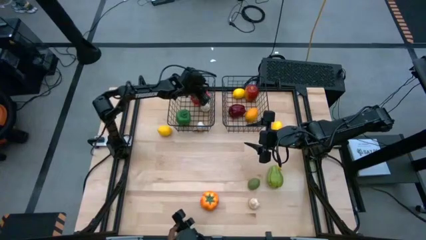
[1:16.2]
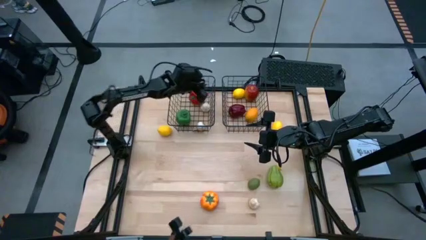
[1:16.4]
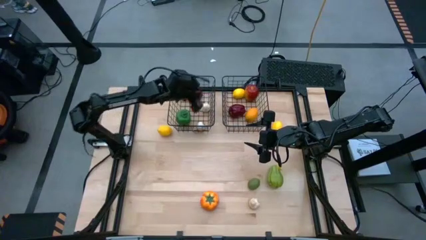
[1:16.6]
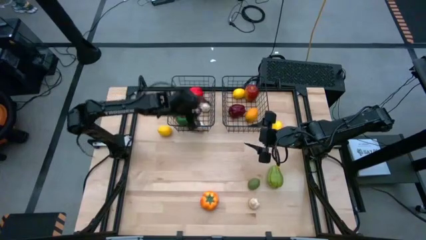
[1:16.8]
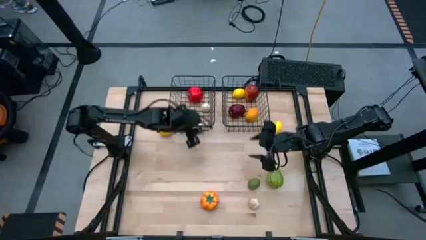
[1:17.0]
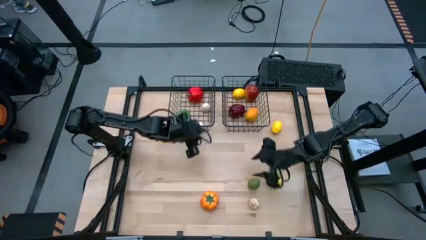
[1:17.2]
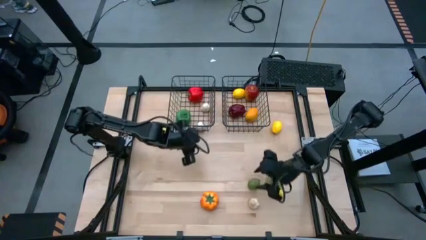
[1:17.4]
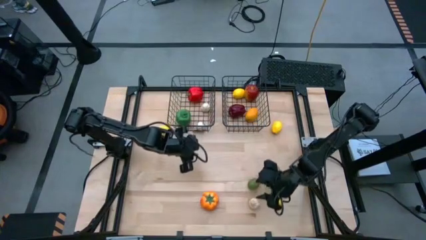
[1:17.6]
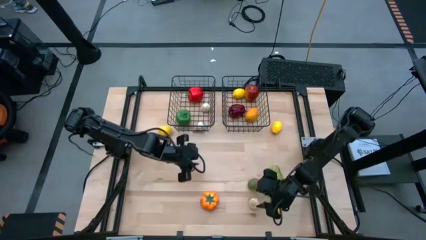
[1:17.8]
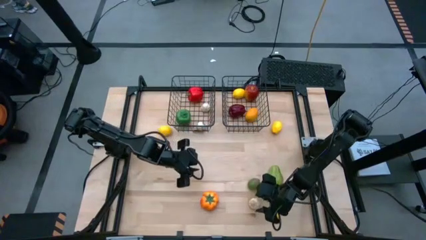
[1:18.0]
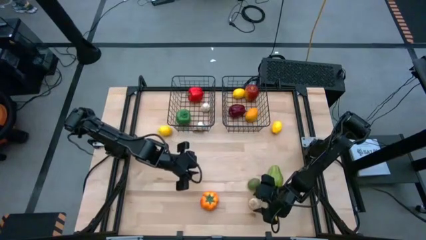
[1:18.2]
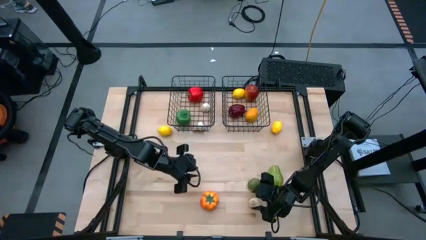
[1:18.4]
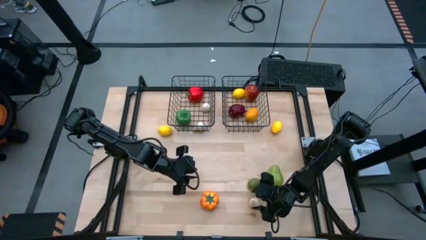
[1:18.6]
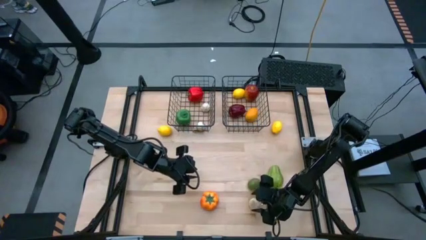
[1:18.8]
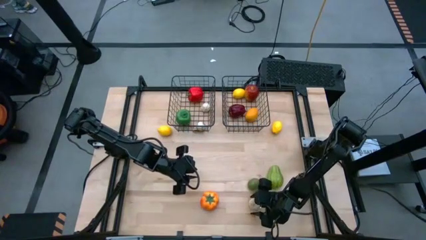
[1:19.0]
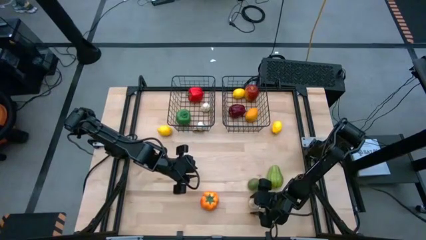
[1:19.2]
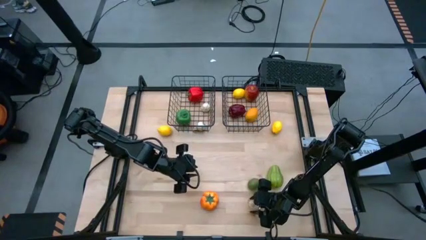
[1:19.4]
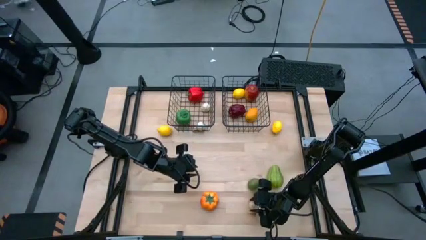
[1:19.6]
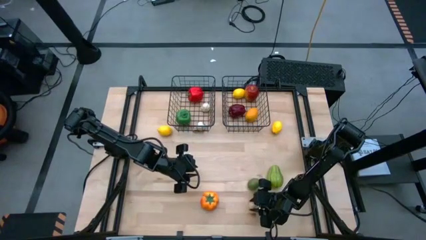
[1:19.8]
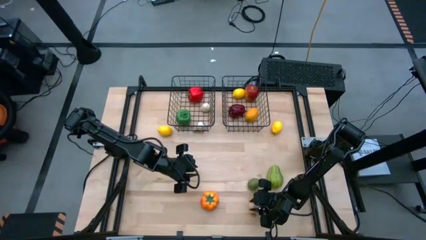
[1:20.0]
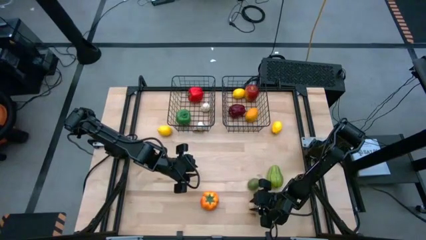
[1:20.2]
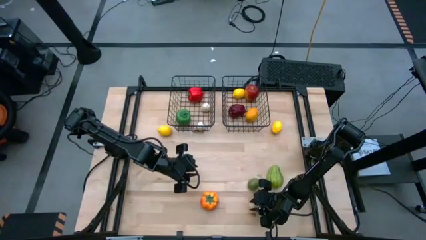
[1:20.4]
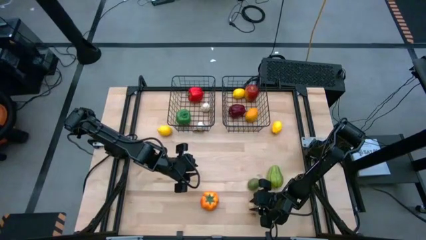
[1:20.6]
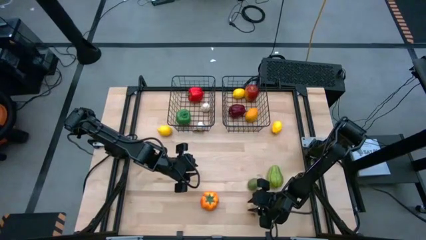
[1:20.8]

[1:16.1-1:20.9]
Task: Sort produce into baskets
Put the white garlic into the left wire basket

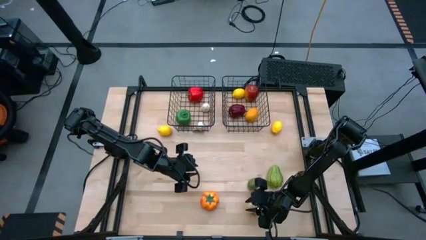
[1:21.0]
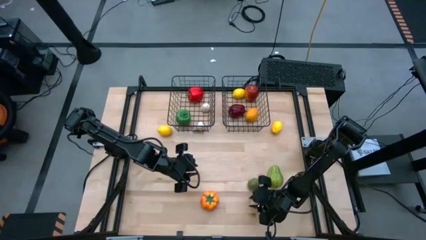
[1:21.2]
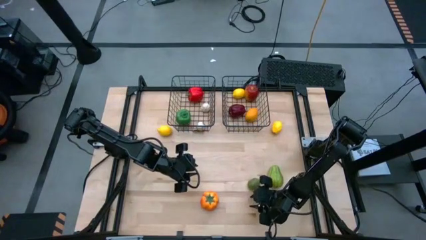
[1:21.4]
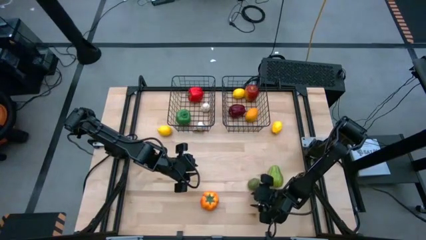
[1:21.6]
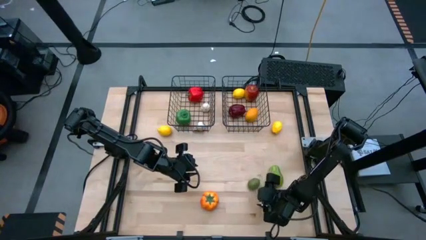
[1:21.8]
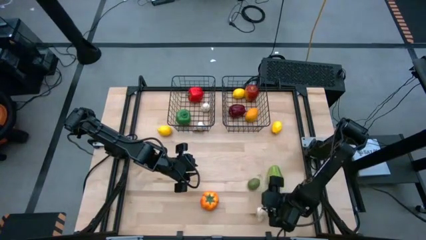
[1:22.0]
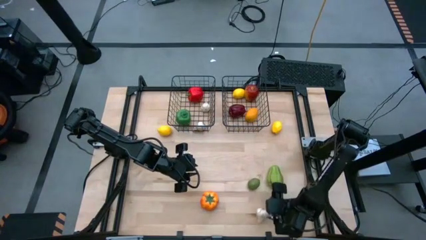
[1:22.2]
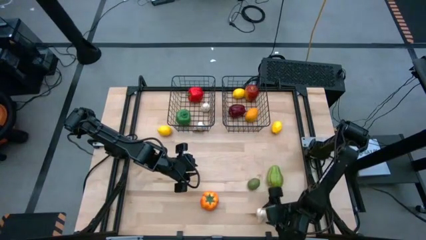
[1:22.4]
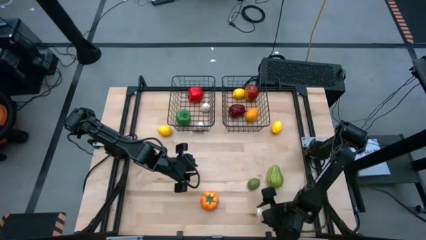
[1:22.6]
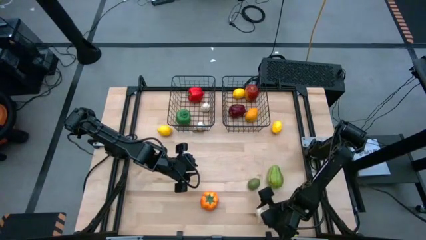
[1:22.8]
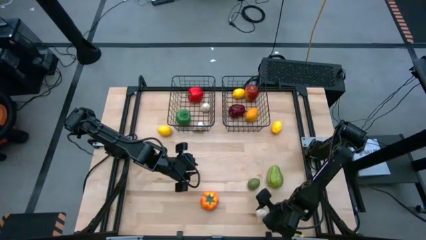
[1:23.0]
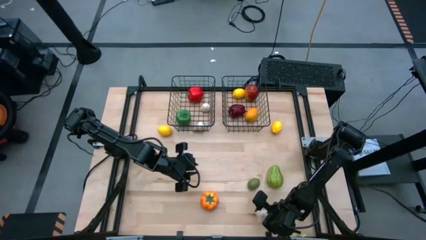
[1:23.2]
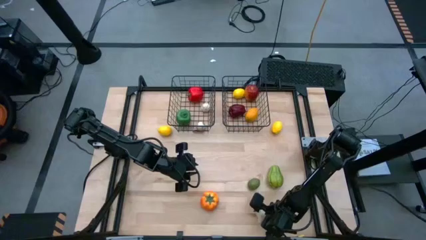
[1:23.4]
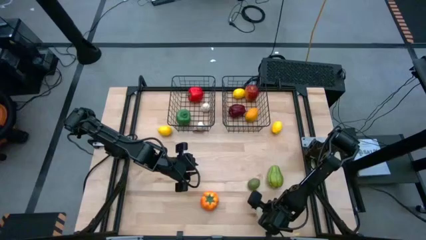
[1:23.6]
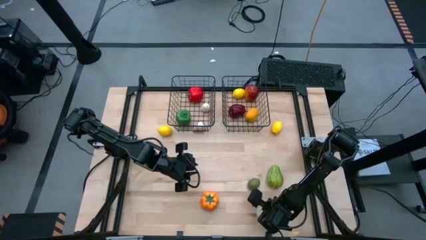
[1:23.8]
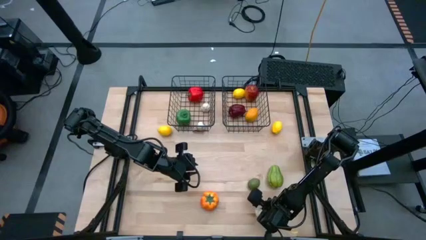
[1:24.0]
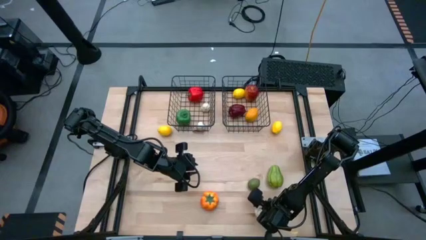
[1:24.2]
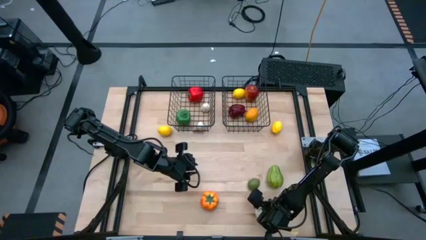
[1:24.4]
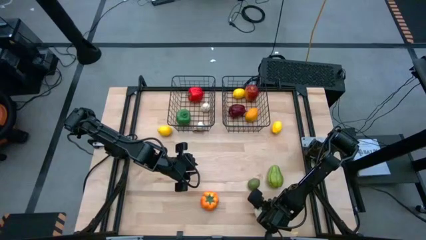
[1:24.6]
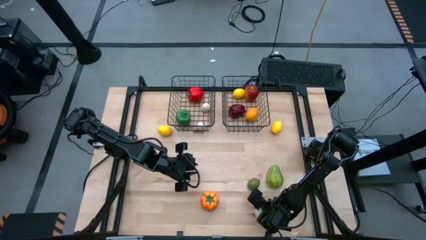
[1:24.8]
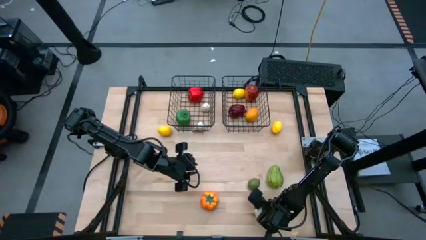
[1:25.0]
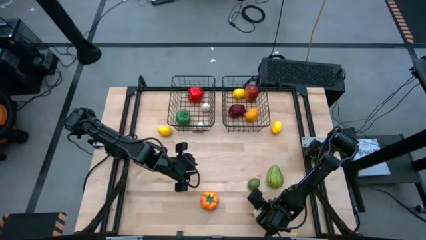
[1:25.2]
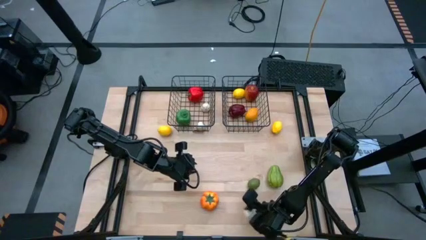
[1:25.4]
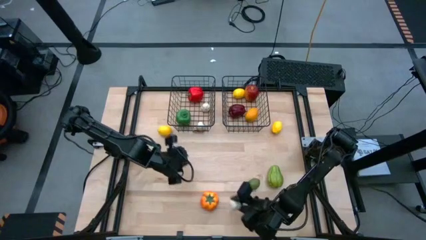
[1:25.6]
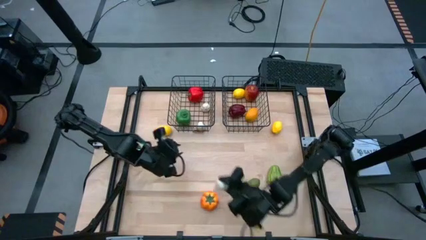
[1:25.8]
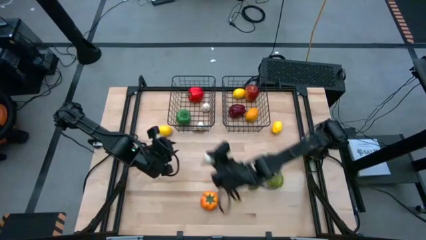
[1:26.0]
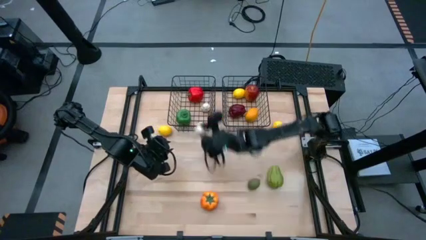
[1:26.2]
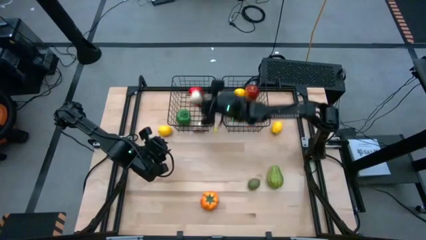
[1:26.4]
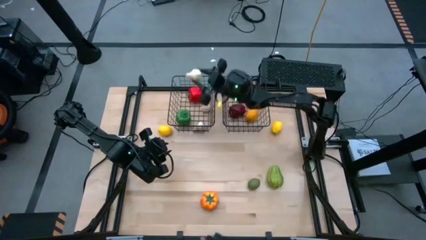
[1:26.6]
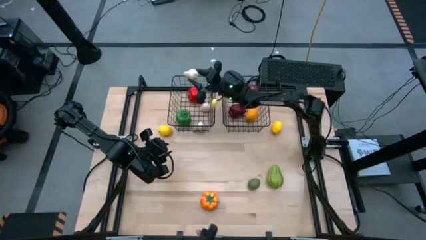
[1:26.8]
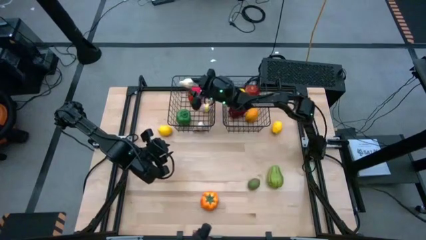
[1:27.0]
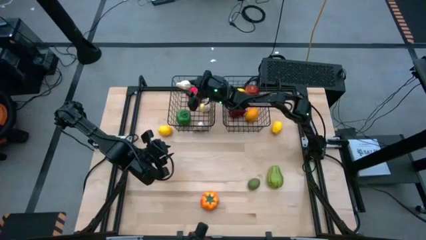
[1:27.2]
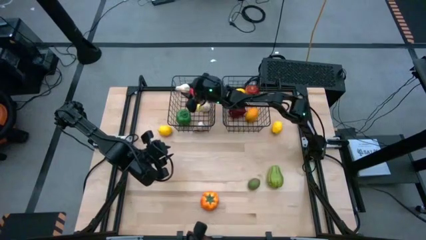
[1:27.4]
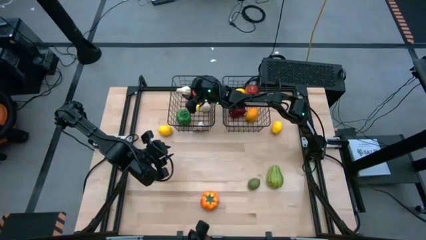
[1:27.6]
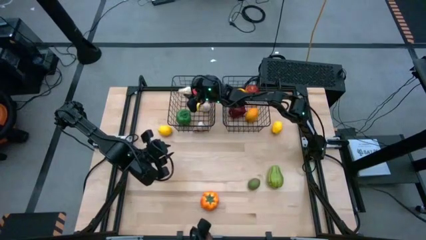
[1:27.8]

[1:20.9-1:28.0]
Put the white garlic into the left wire basket
